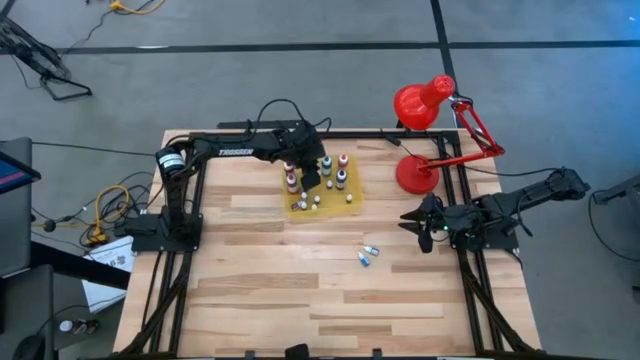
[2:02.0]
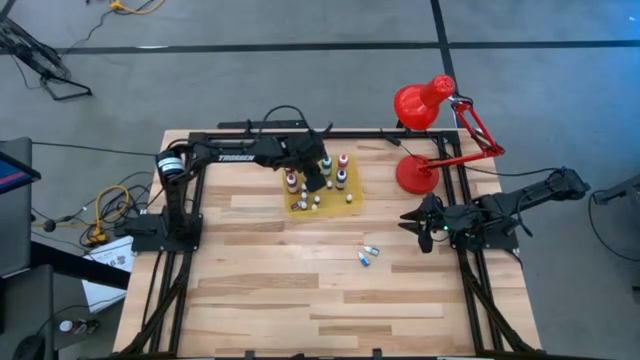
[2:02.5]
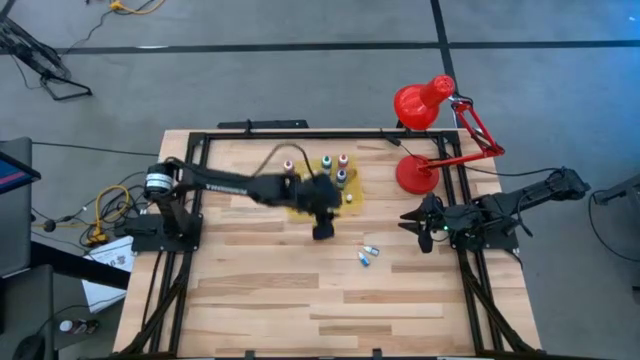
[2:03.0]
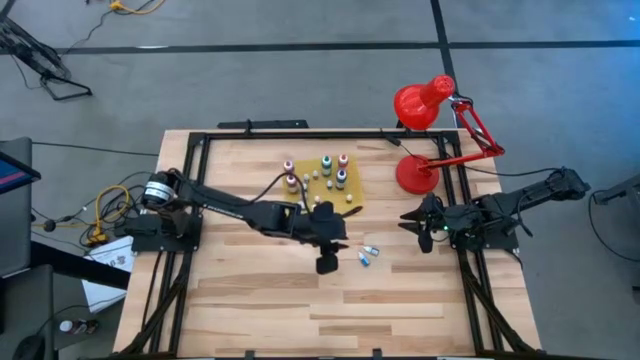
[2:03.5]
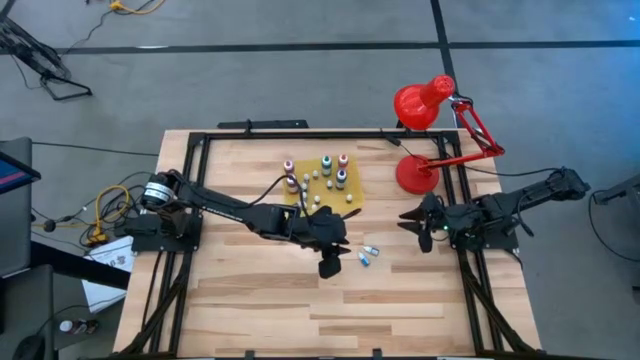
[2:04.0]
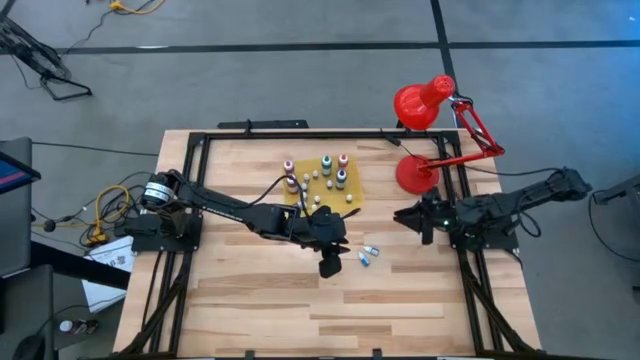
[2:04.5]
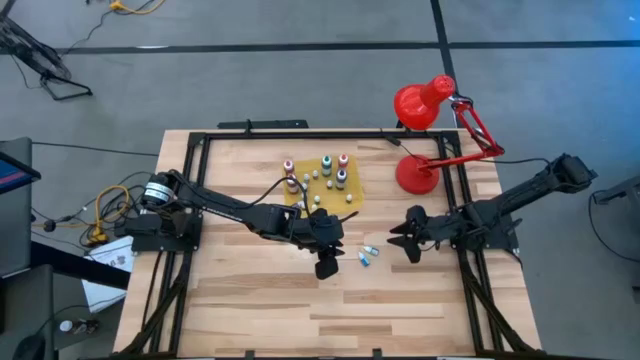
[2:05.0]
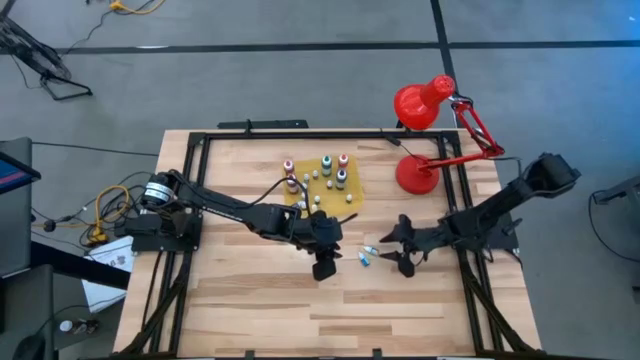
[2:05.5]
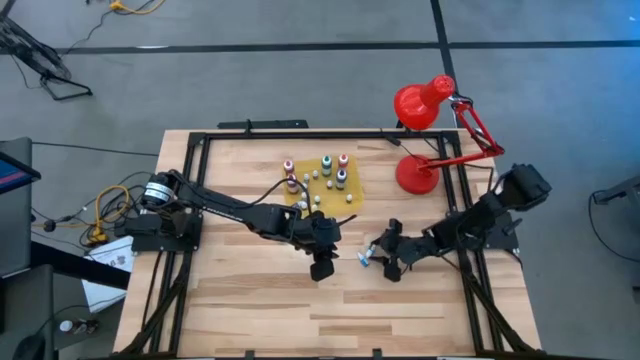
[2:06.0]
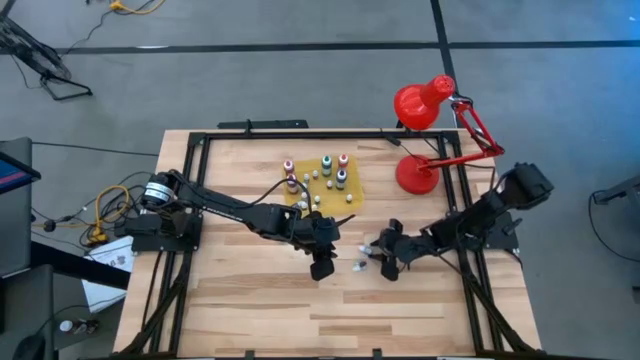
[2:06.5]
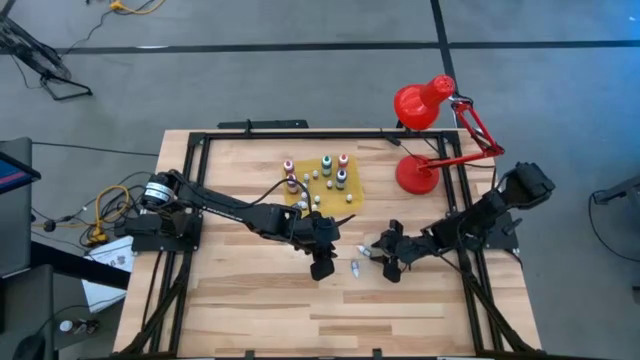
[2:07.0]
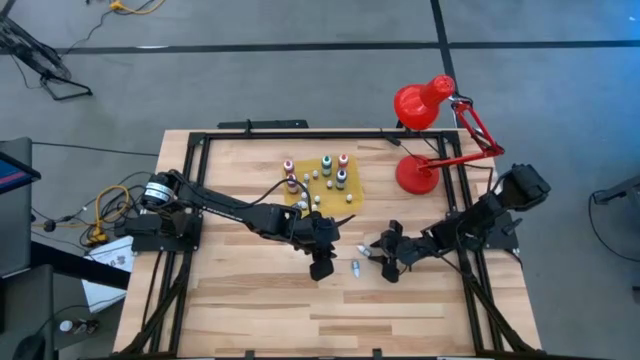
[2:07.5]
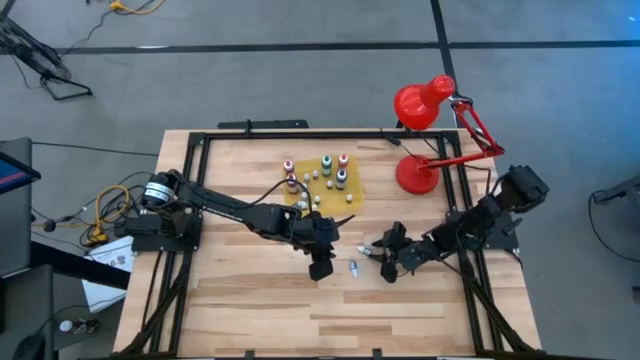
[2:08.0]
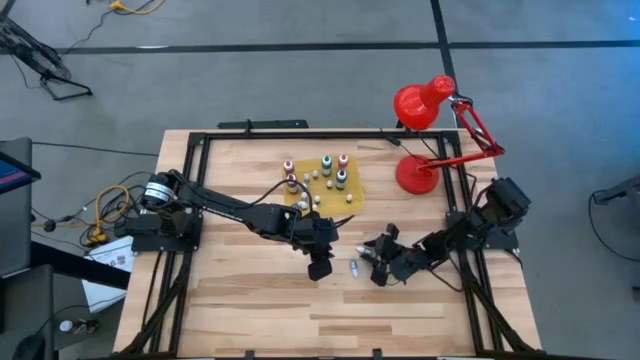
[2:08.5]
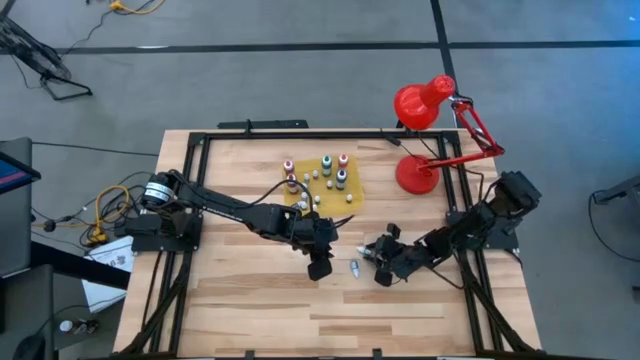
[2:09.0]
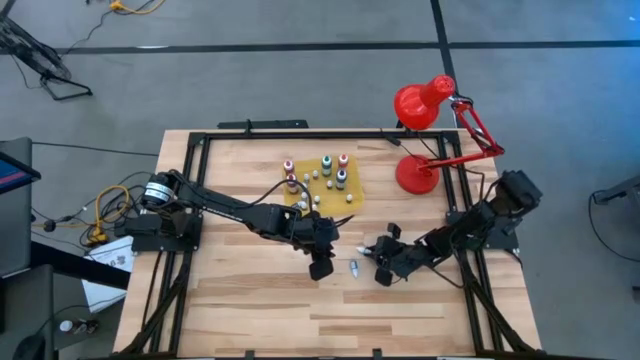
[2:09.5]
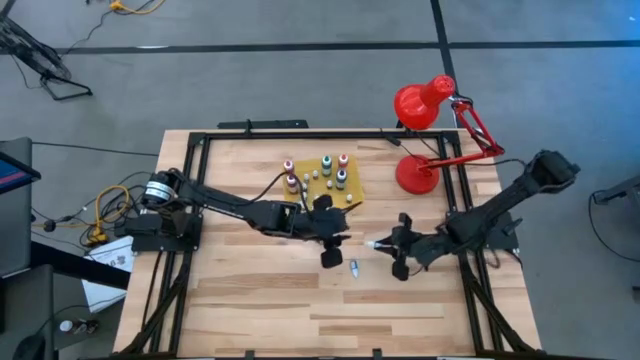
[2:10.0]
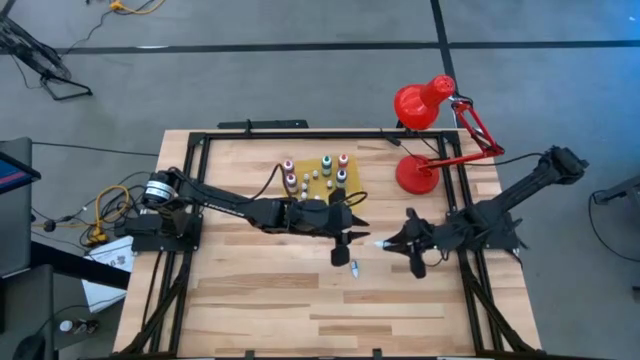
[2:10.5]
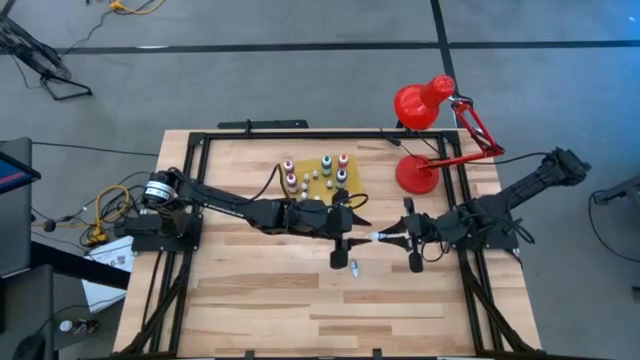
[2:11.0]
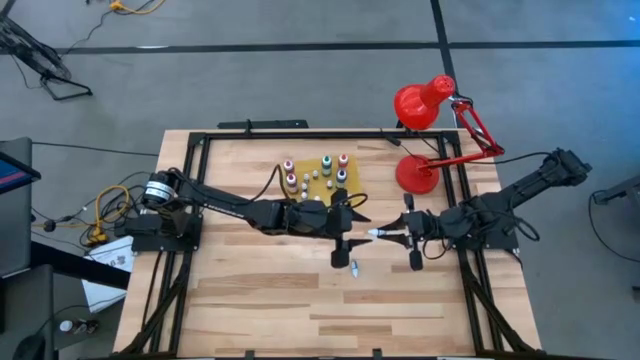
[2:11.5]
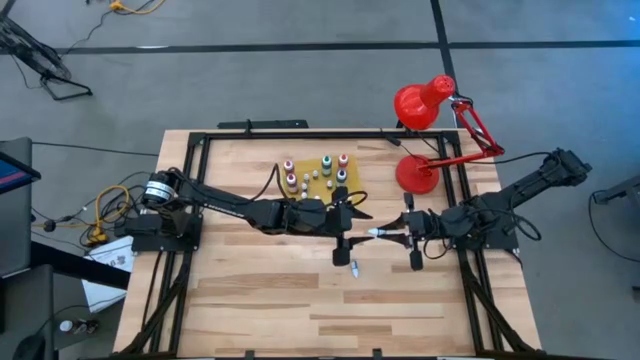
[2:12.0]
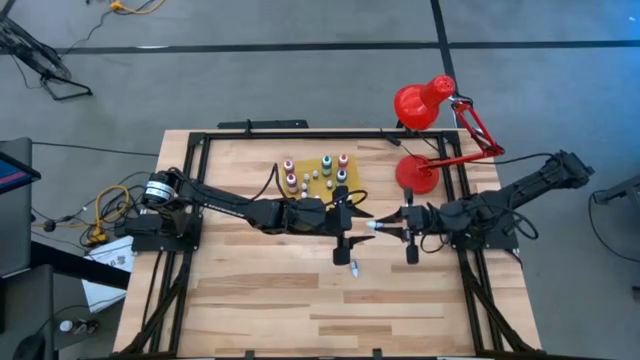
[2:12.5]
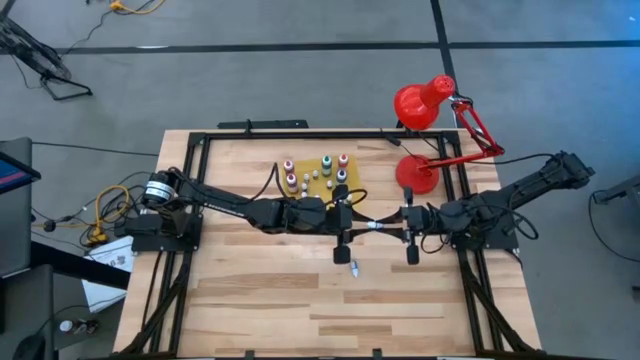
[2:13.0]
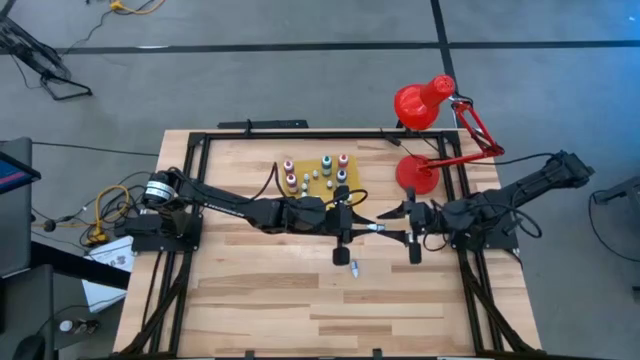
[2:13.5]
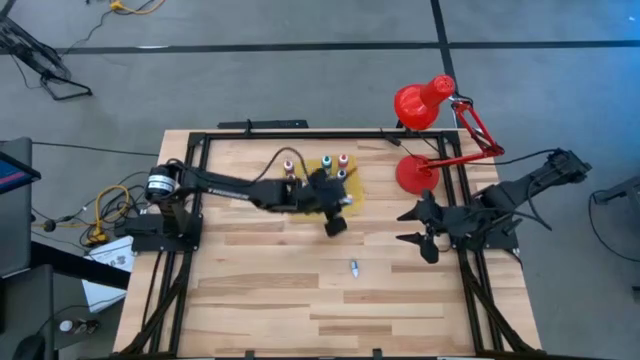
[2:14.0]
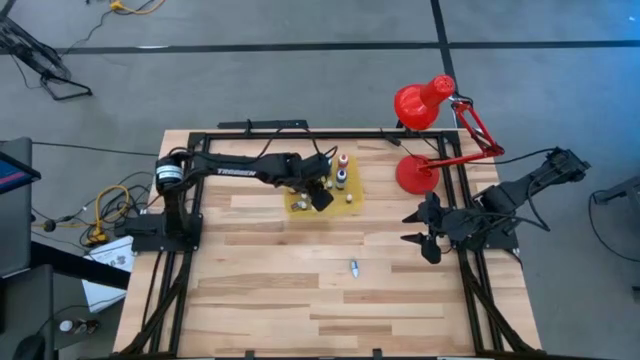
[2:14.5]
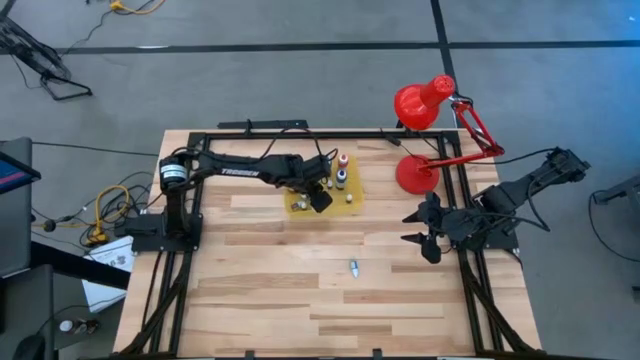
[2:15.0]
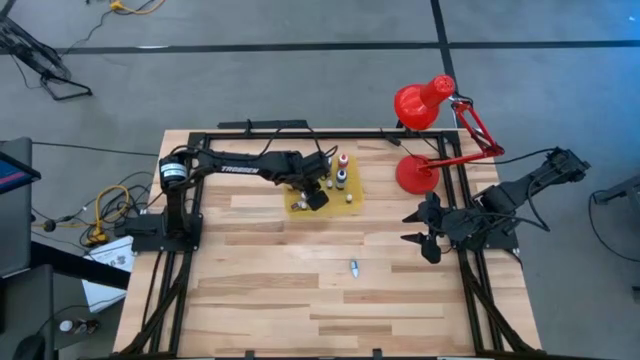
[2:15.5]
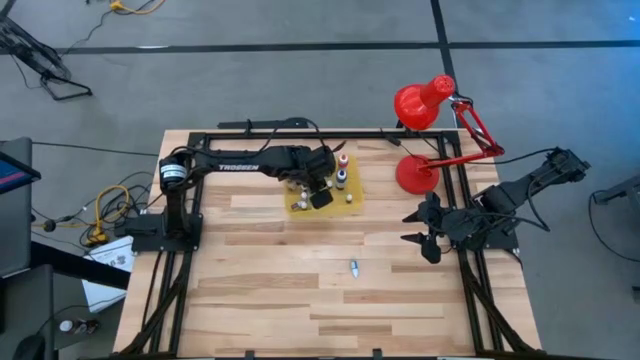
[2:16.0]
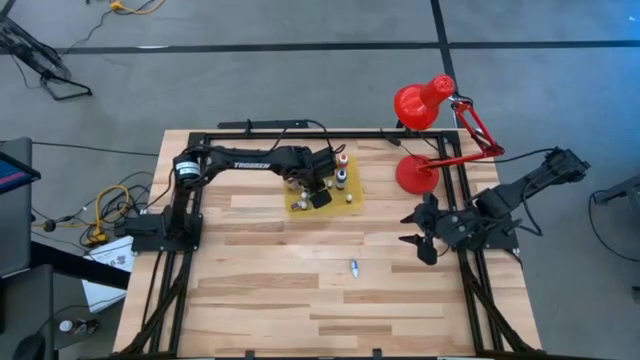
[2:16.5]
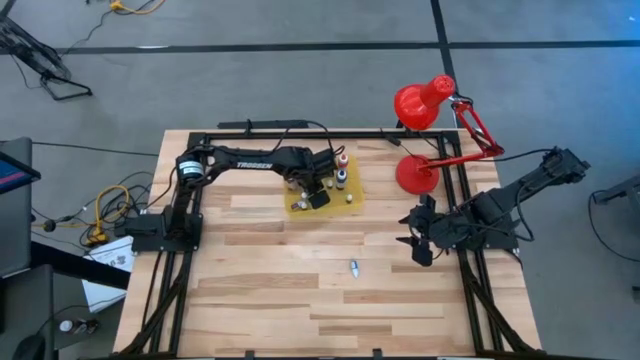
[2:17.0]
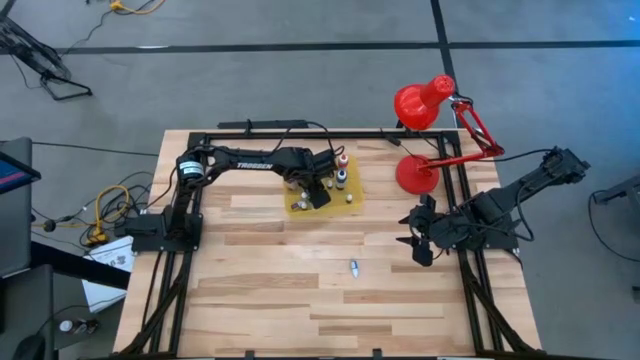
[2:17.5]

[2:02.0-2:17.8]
Task: Pick & Place food coloring
Put the small white food coloring in the bin

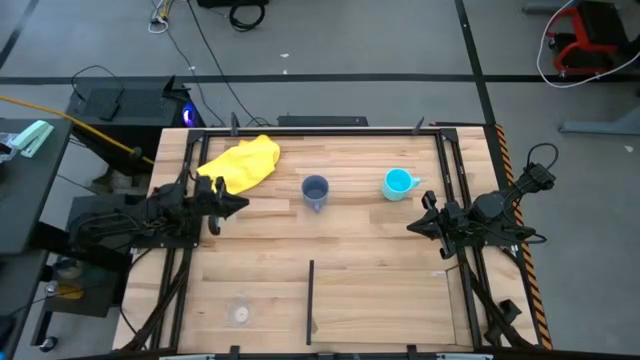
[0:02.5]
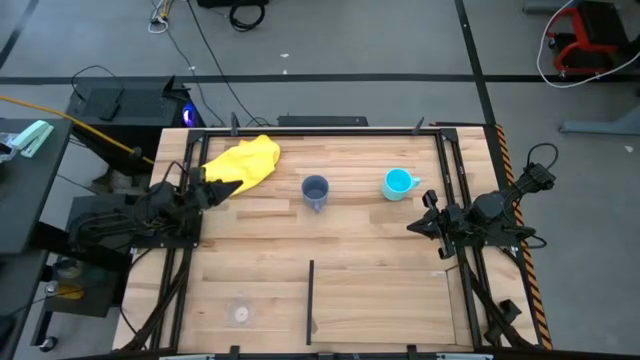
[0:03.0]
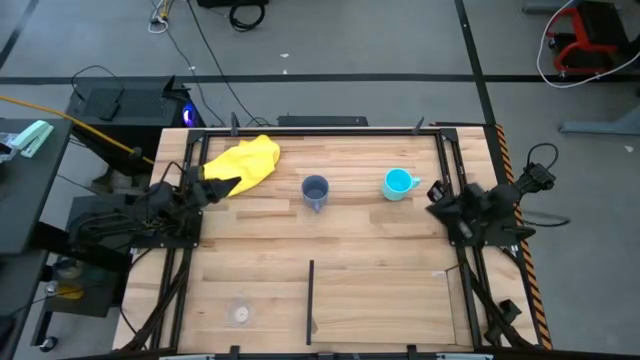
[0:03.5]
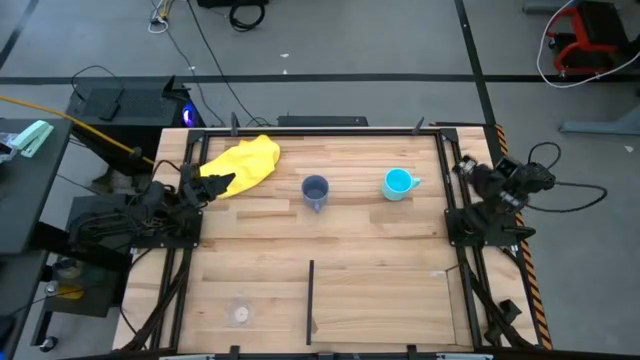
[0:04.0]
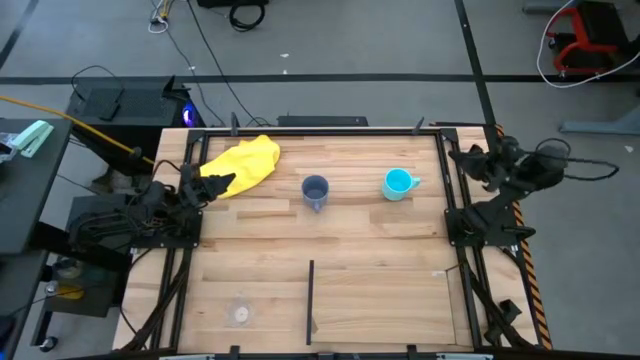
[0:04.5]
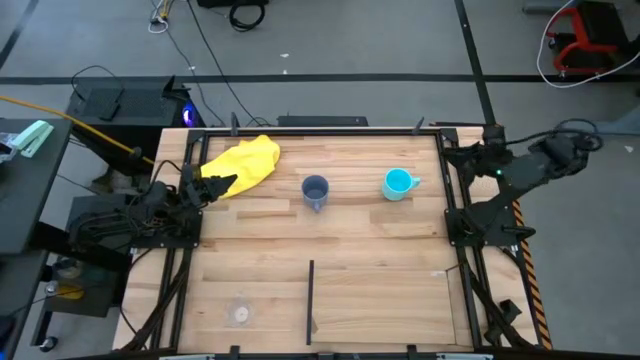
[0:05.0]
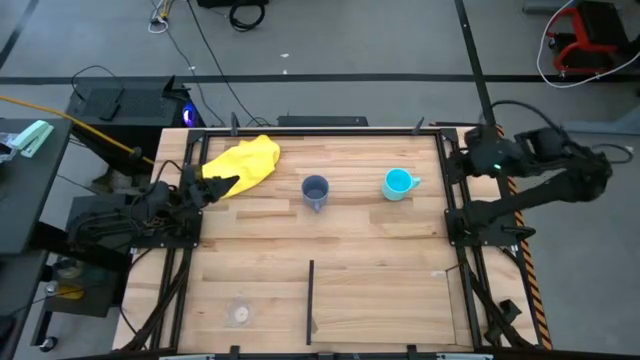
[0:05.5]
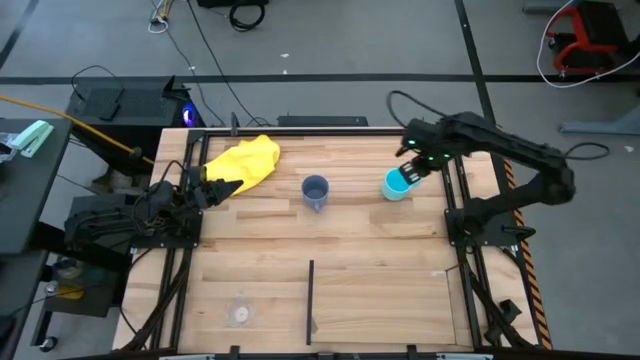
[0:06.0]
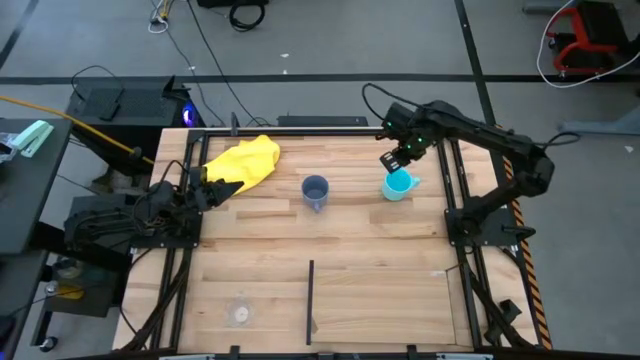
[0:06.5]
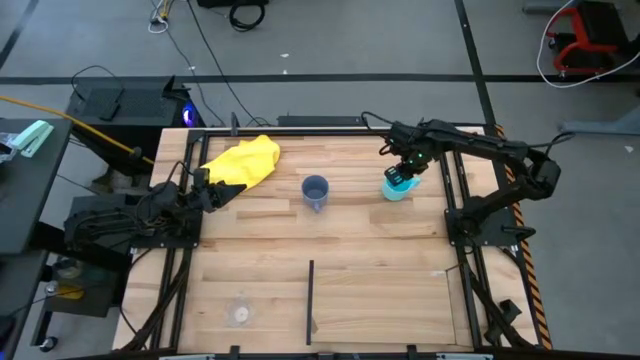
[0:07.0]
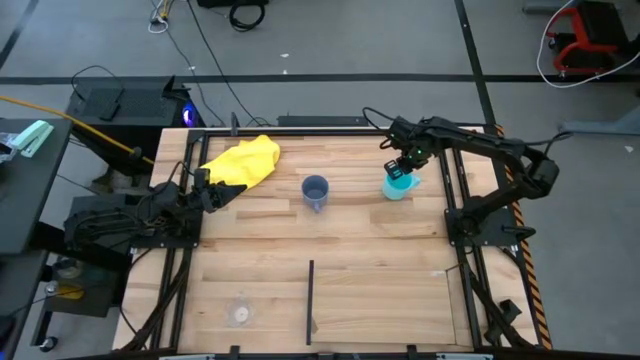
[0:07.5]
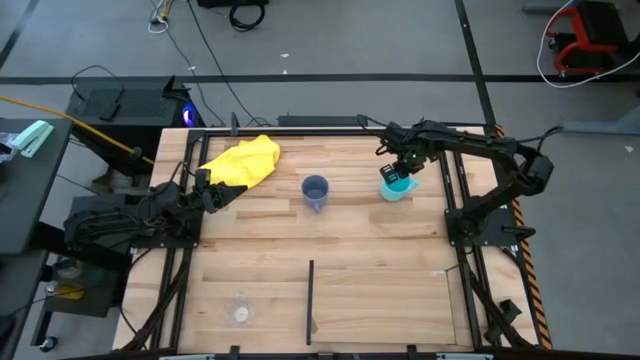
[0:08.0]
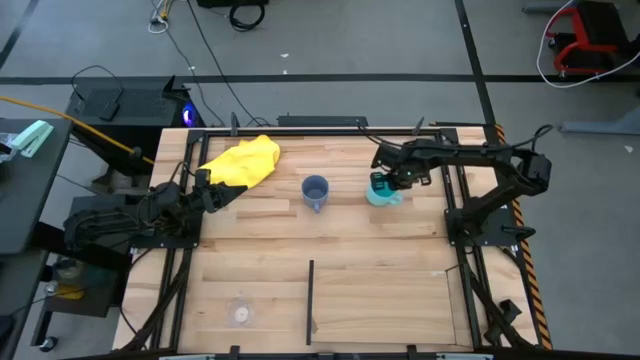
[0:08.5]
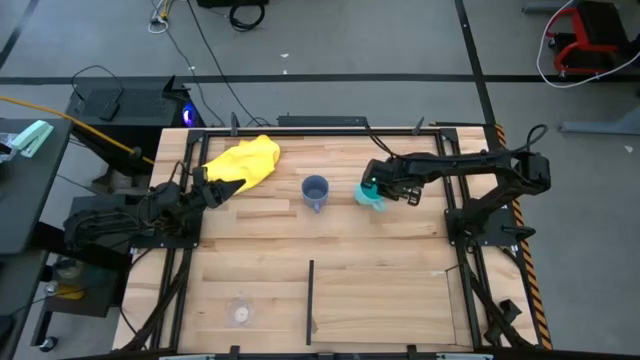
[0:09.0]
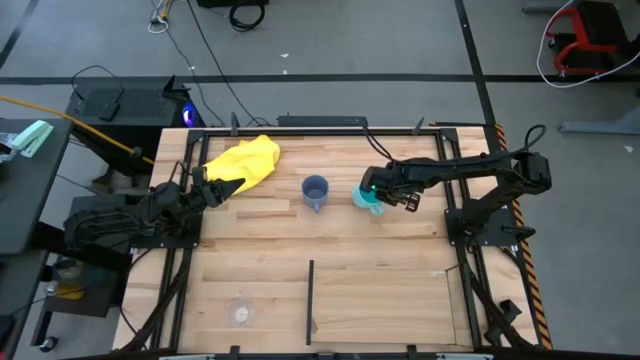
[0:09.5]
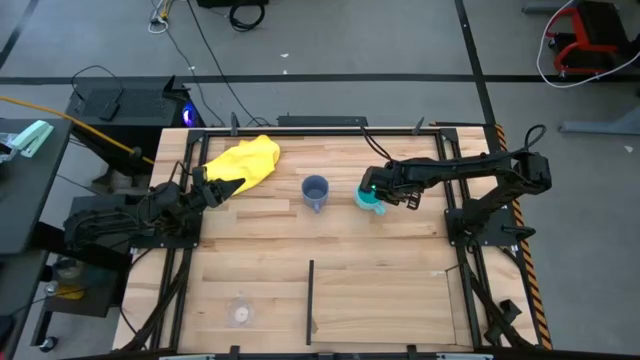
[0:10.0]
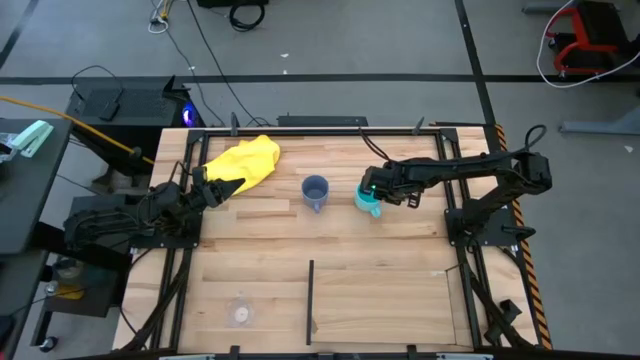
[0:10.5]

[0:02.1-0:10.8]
Task: Stack small to large cups/mugs on shelf
Adjust the blue mug
